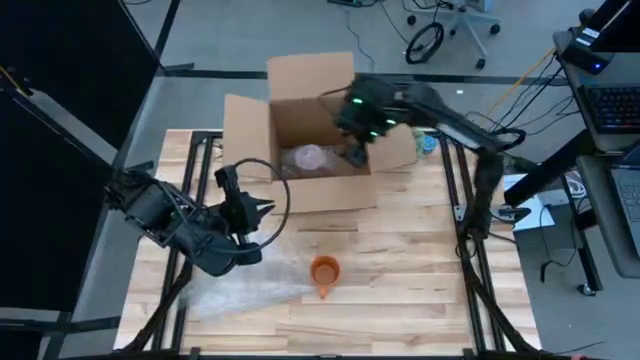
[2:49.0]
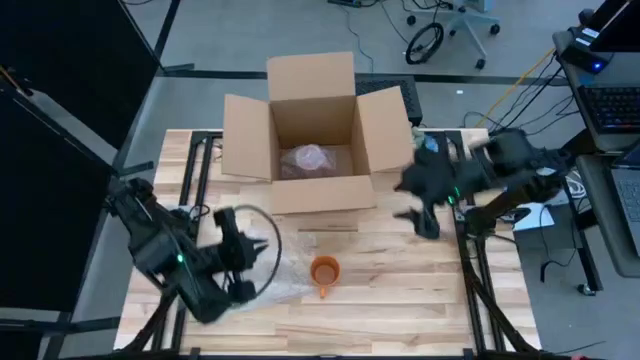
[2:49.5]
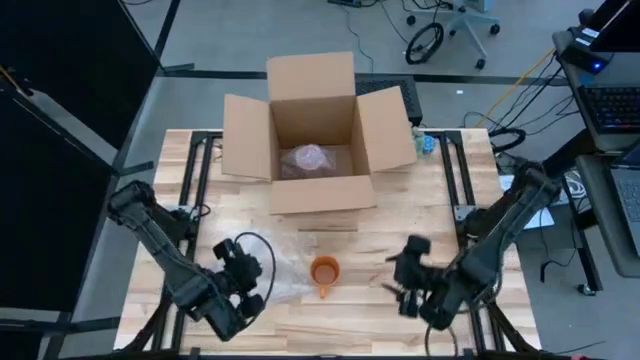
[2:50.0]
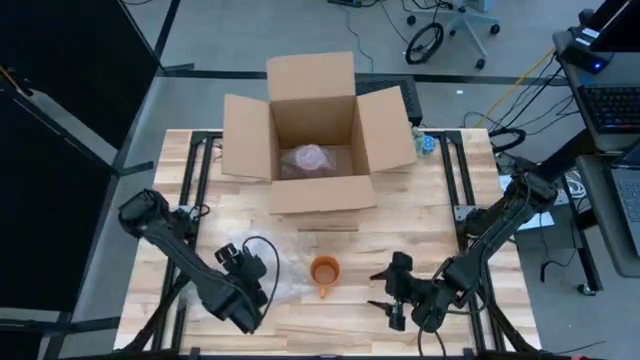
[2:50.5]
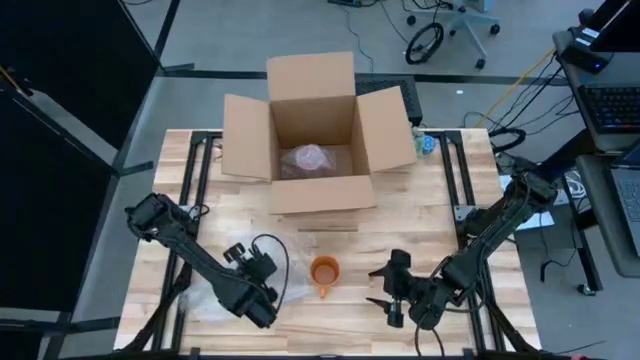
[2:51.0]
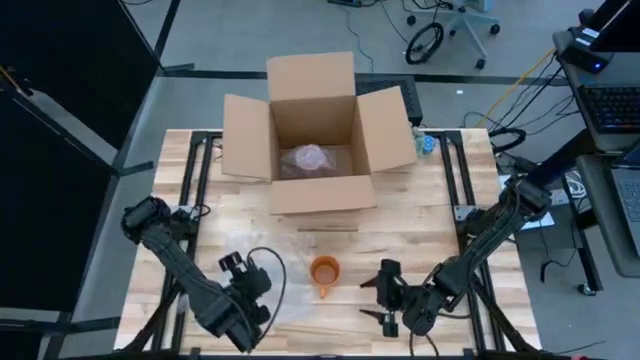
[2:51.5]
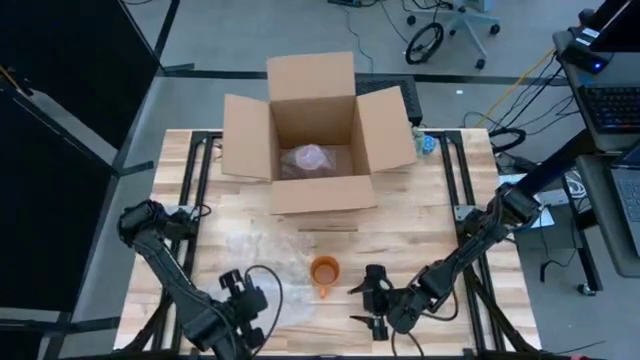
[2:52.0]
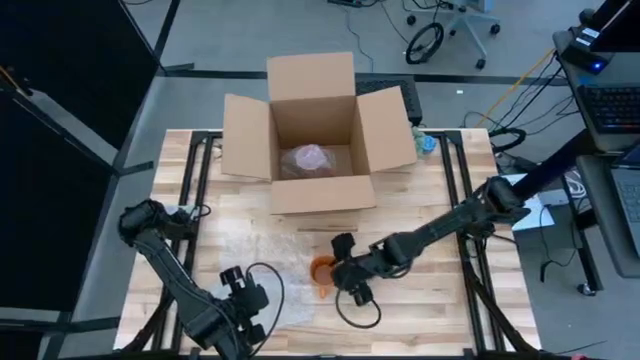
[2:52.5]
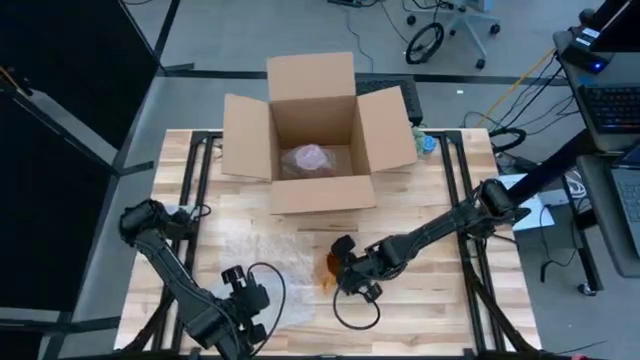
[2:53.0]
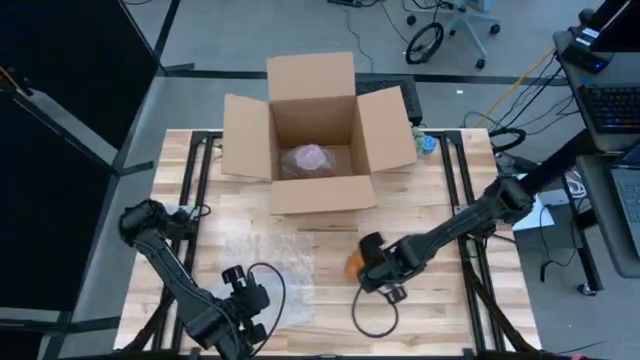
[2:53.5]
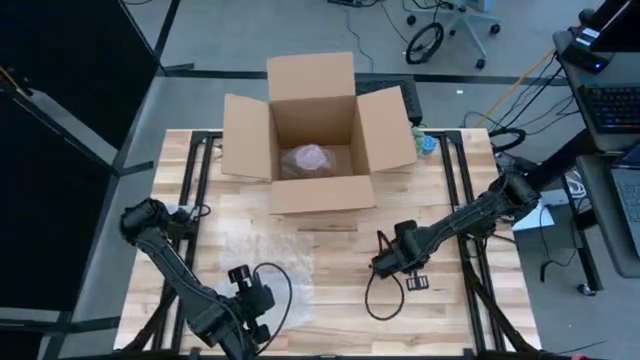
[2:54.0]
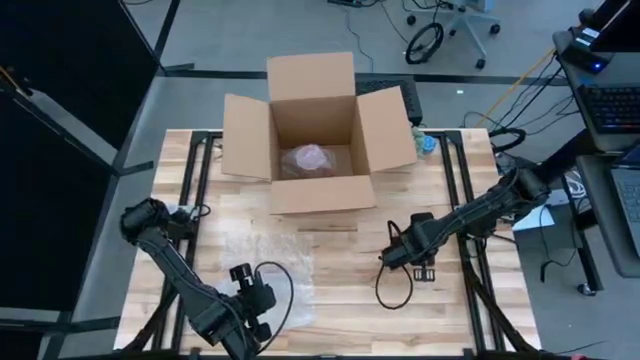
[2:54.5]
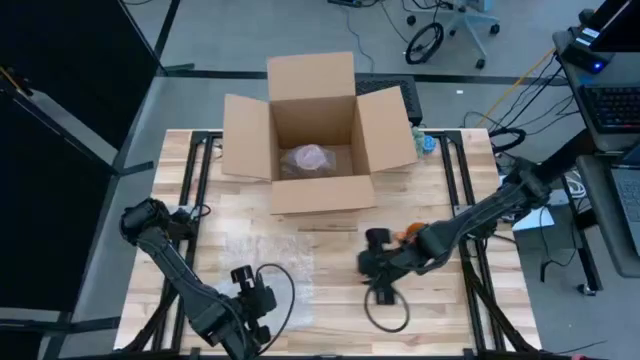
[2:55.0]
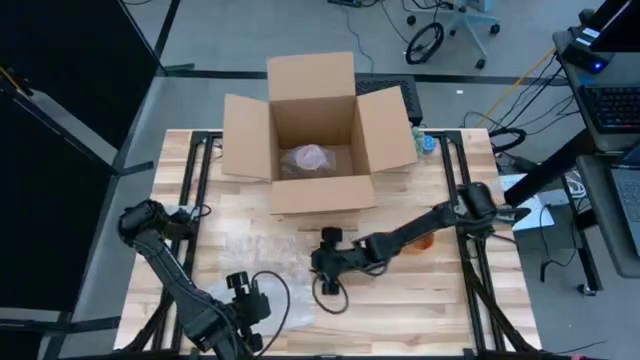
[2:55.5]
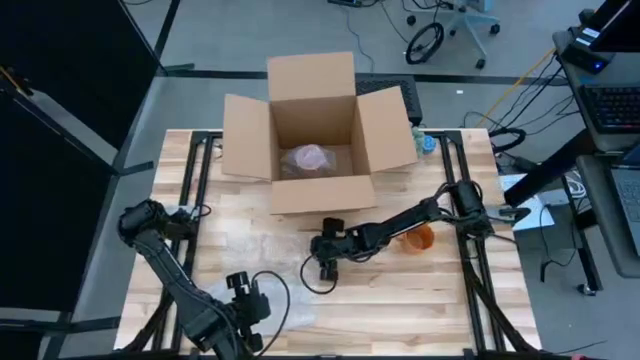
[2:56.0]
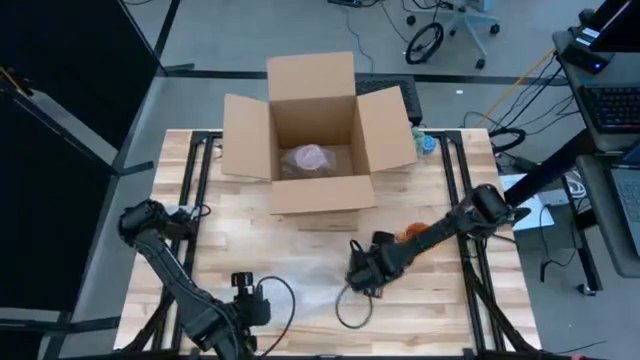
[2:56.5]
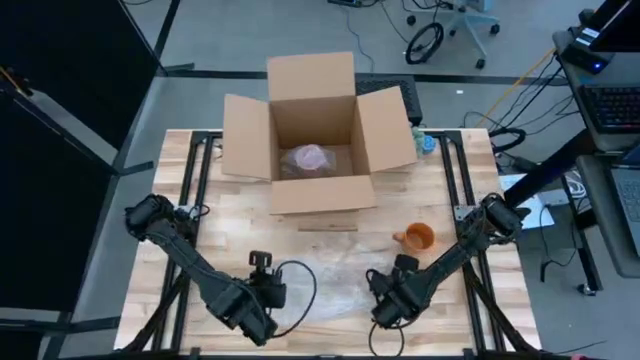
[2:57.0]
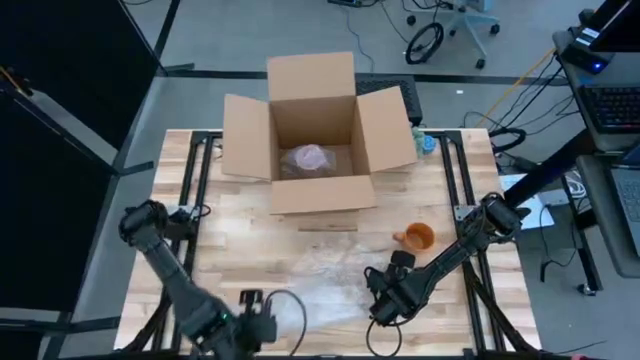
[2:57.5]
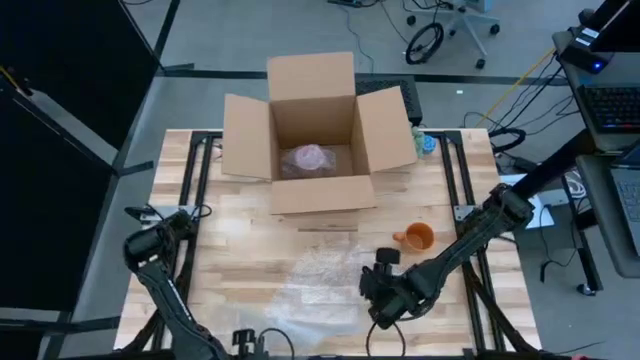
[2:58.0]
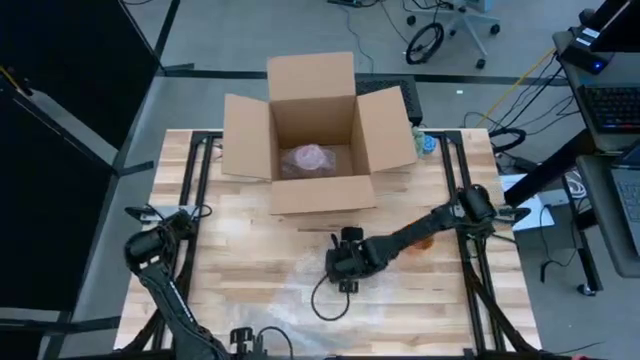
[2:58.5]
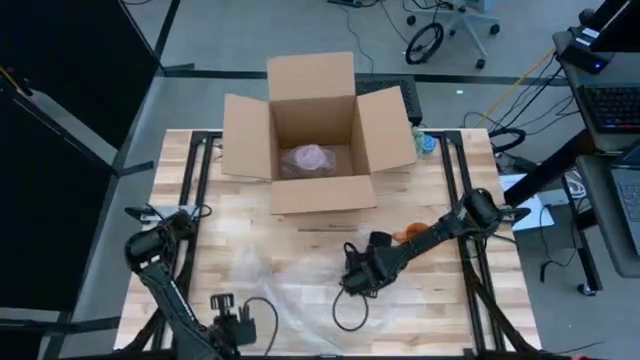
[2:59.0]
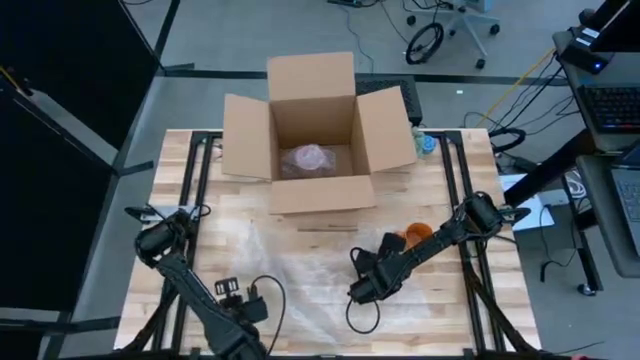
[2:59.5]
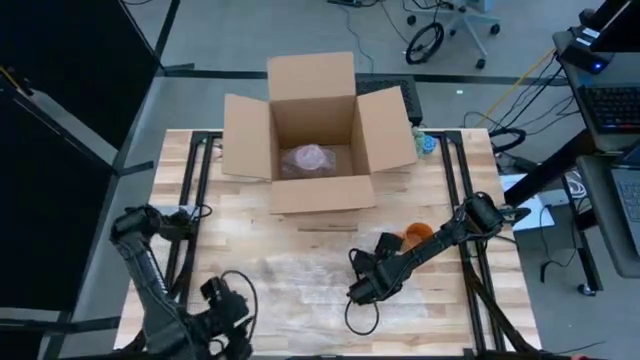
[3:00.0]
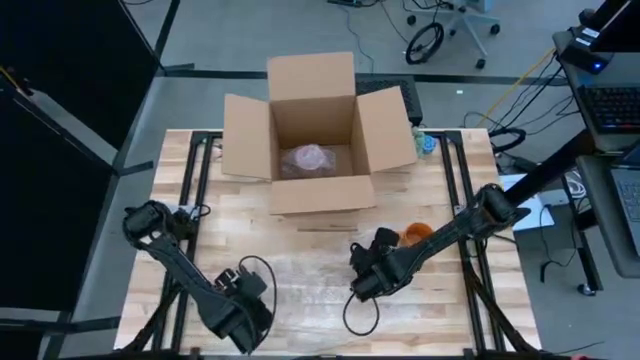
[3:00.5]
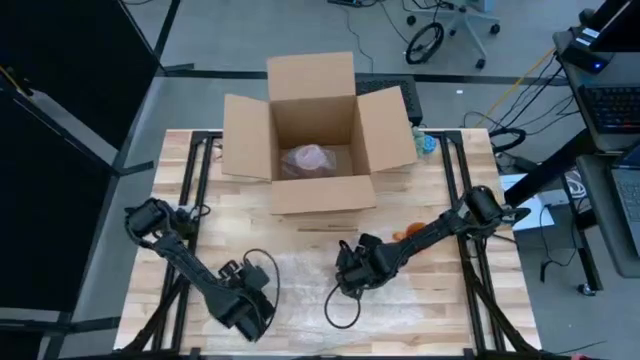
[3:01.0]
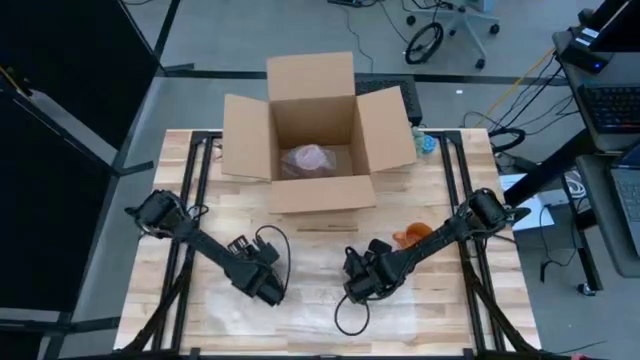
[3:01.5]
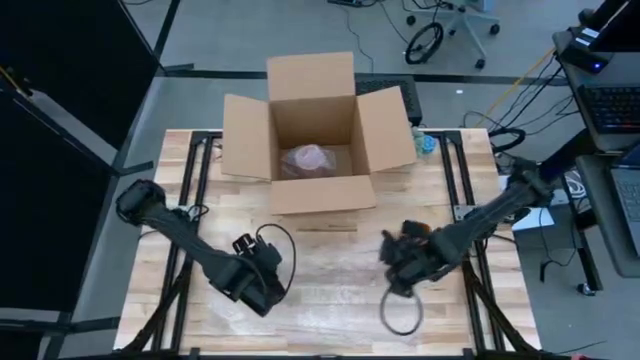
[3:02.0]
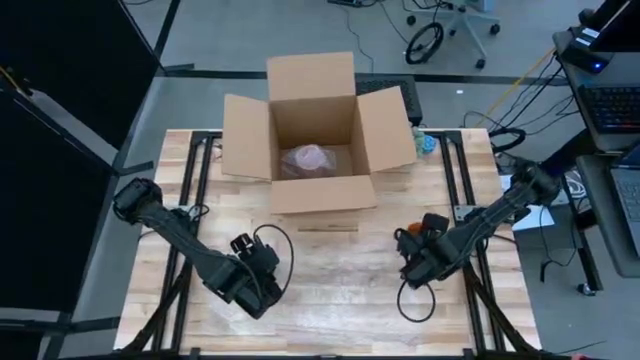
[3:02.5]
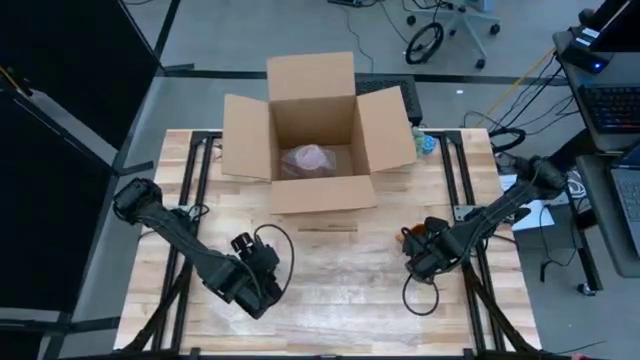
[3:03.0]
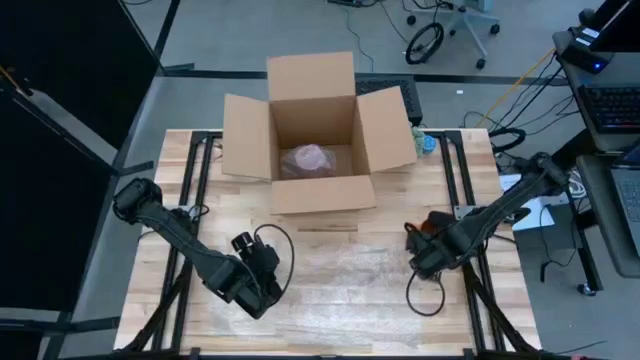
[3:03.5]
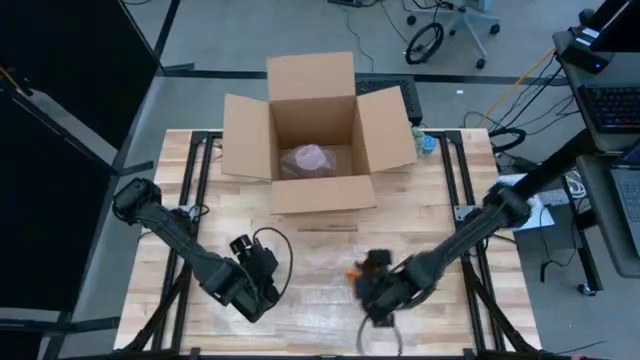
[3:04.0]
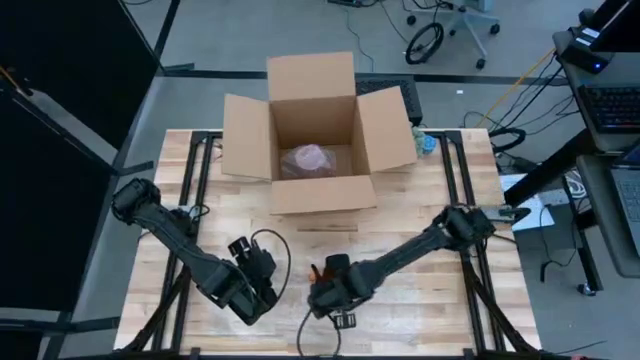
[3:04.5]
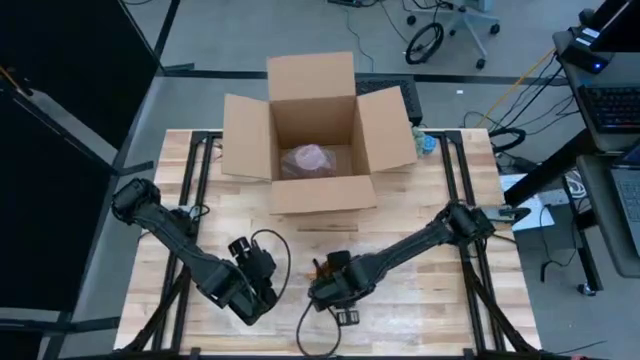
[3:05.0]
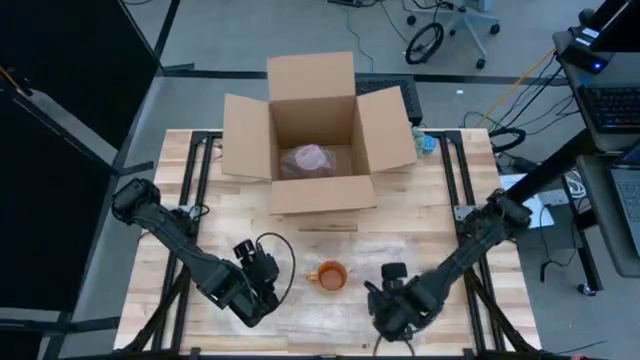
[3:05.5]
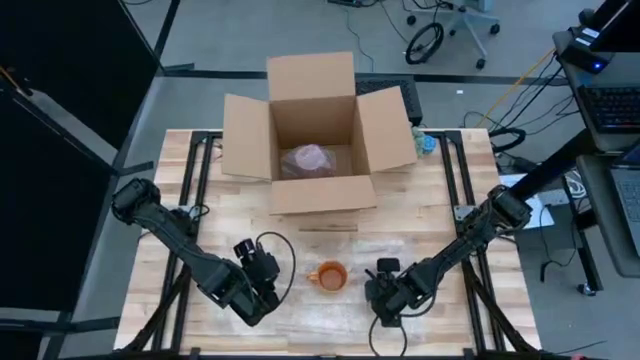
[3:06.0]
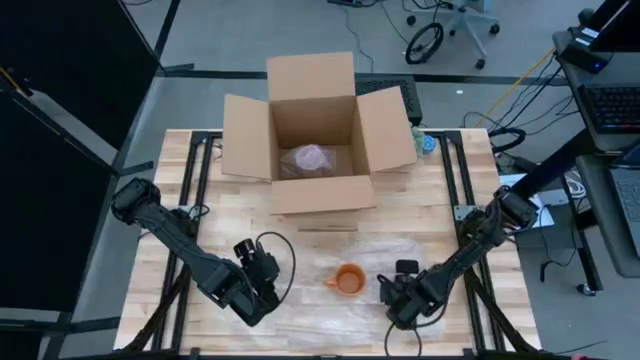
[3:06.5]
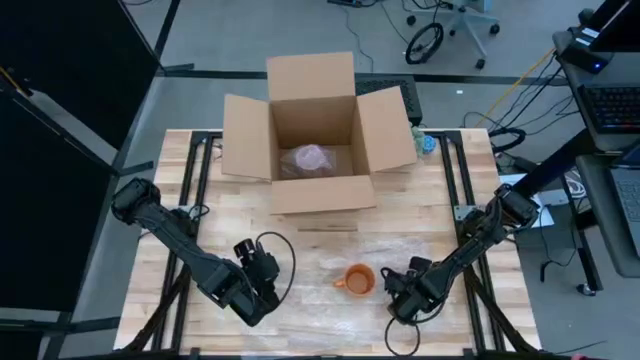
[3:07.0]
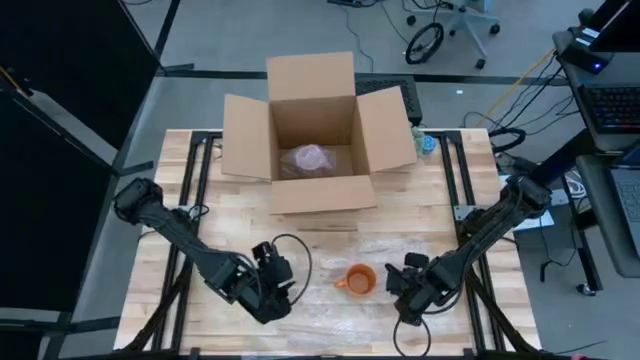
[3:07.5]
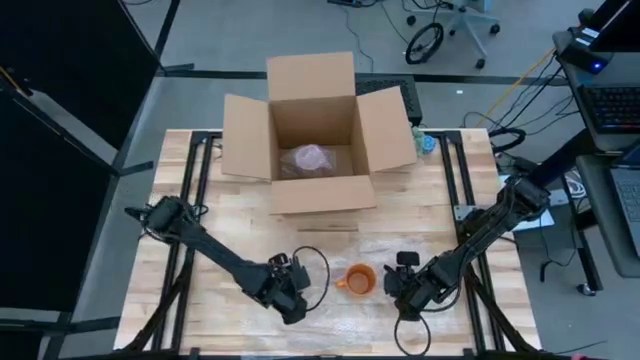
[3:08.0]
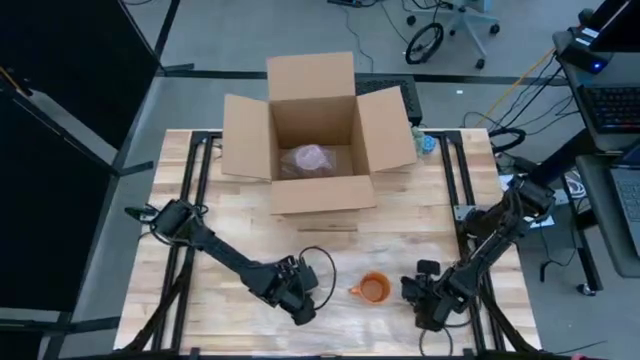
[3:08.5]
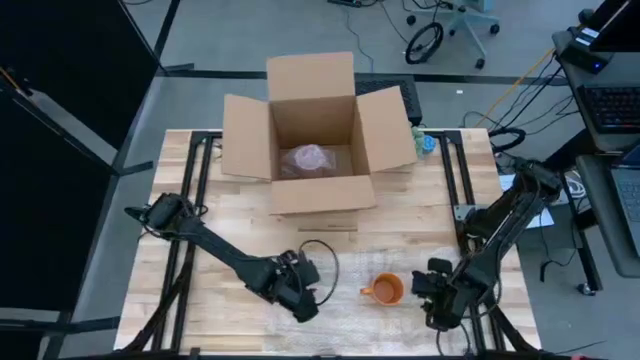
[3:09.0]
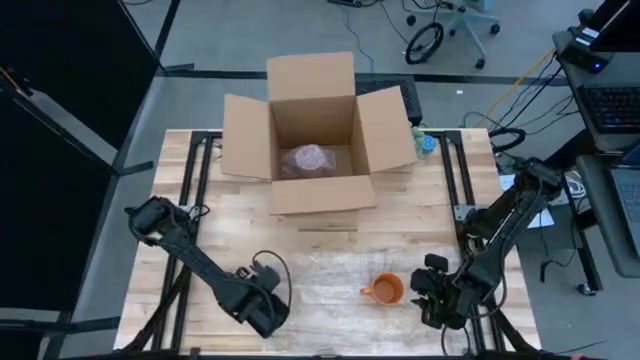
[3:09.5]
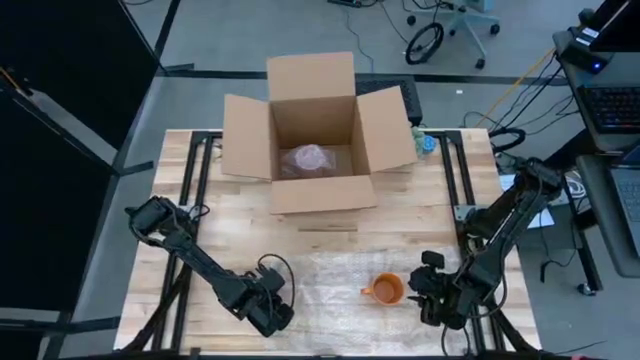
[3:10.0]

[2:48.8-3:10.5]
Task: wrap mug
Wrap the pink mug with transparent bubble wrap
